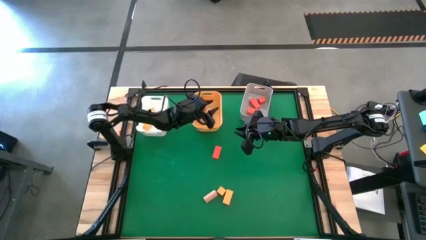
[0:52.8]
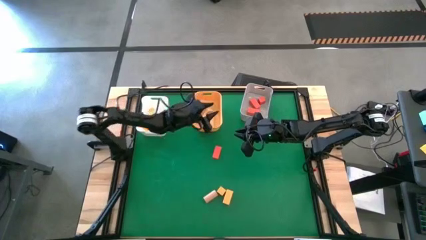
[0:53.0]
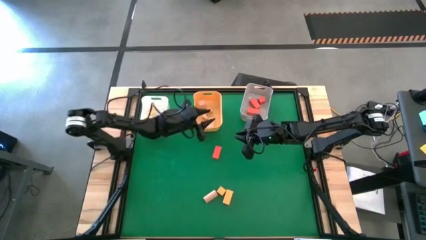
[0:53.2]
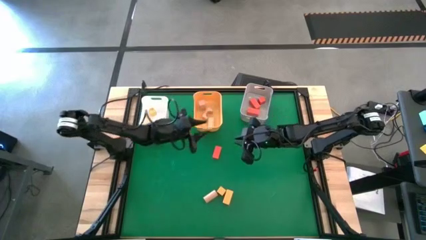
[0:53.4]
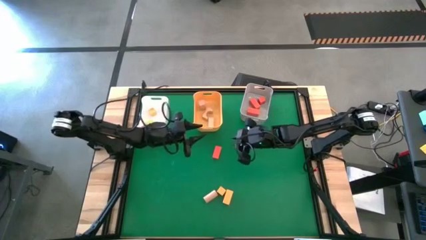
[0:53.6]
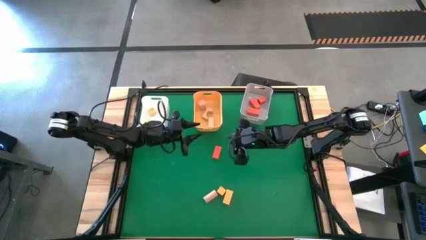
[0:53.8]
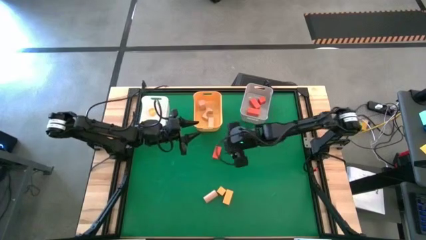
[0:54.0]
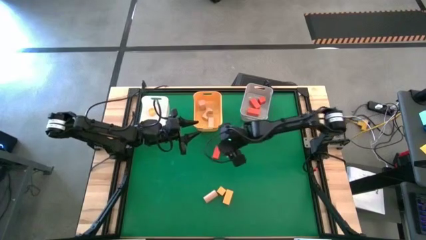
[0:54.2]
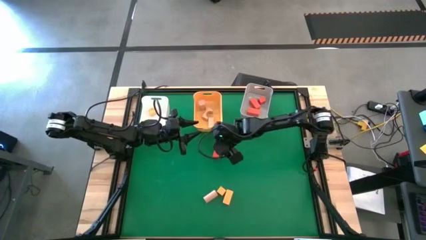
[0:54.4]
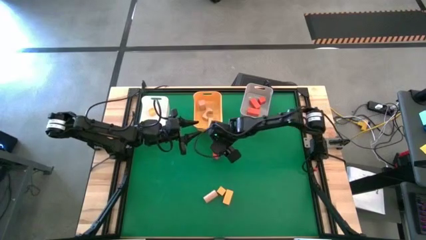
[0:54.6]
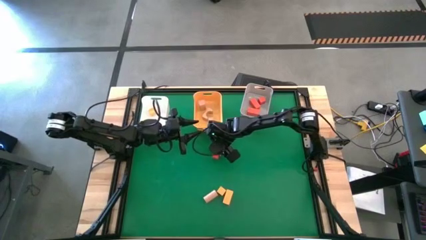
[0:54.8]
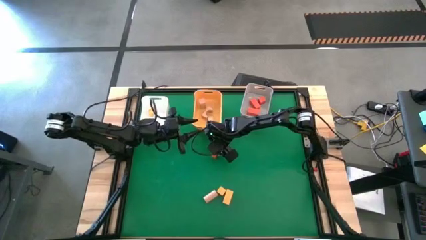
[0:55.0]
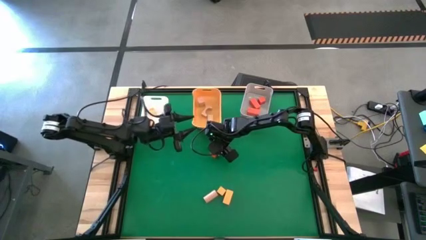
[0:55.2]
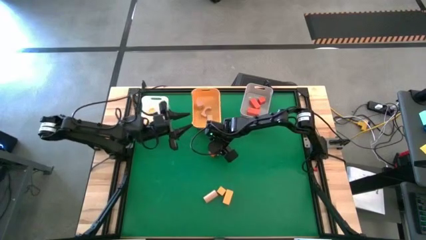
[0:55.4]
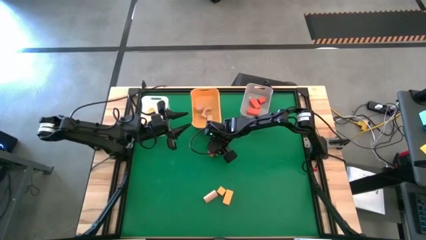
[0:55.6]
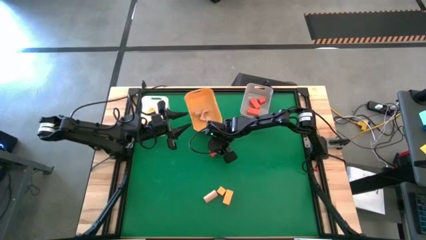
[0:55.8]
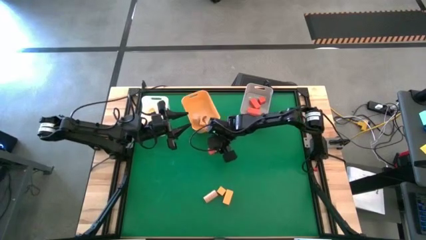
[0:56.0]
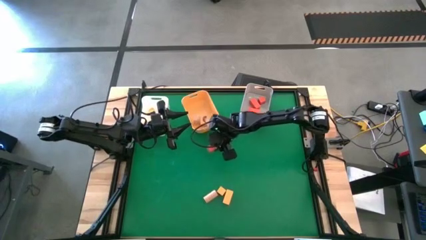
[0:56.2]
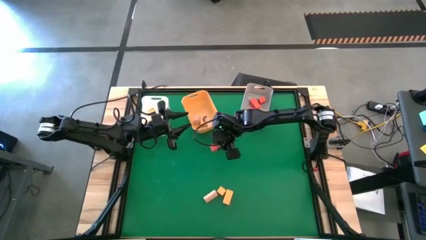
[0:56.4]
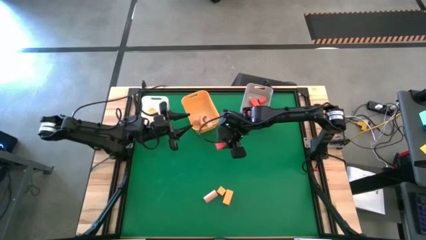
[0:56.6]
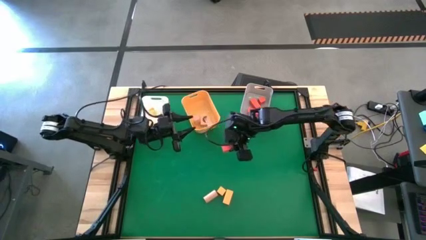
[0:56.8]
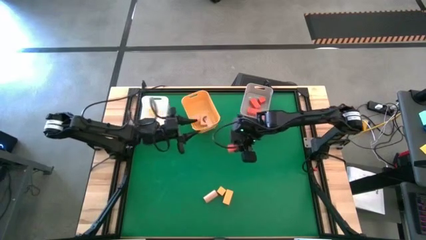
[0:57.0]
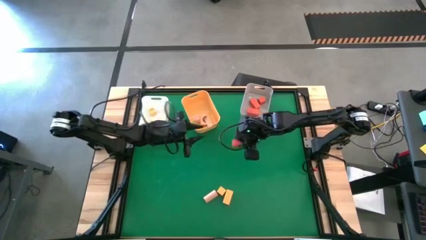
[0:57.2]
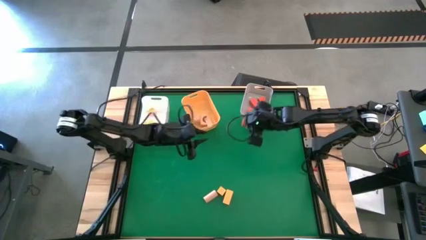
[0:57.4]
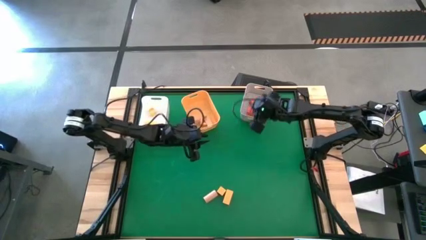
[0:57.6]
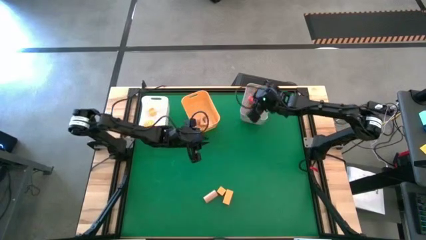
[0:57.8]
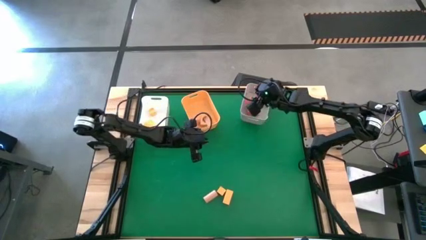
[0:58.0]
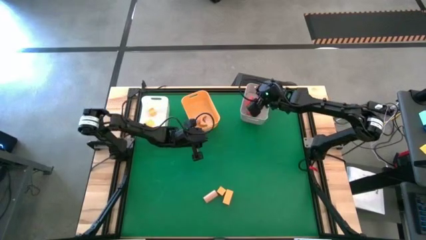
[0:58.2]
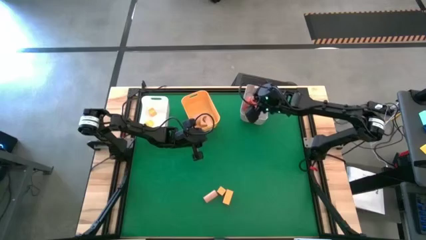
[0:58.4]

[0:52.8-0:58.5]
Task: Sort & place blocks by color
Put the orange block into the light gray bin

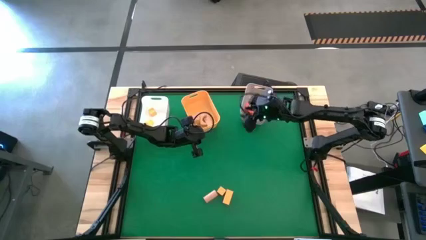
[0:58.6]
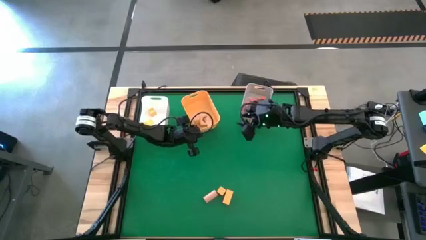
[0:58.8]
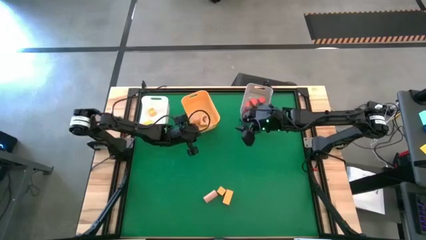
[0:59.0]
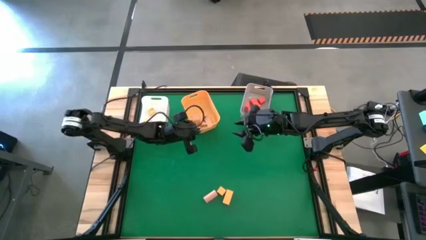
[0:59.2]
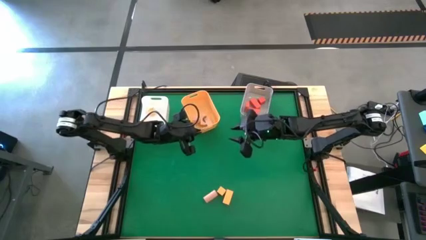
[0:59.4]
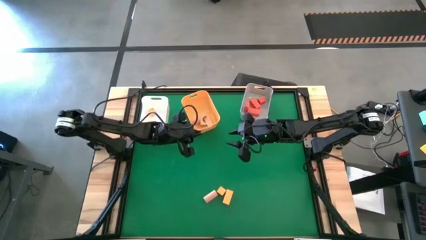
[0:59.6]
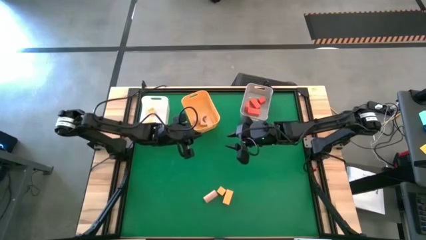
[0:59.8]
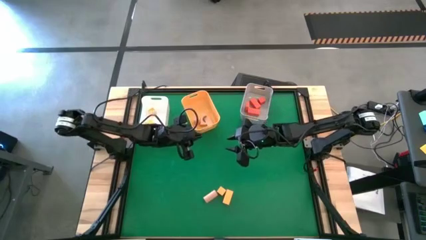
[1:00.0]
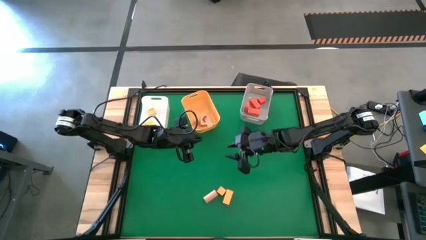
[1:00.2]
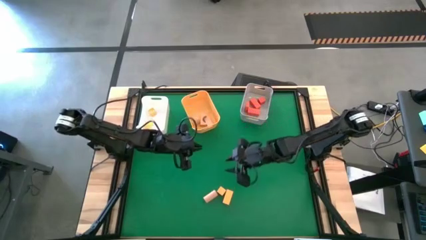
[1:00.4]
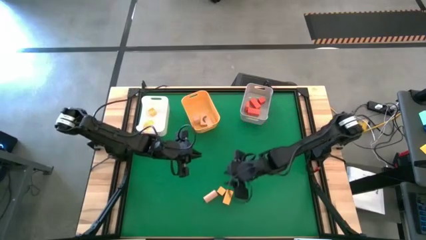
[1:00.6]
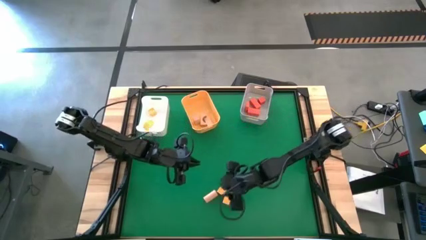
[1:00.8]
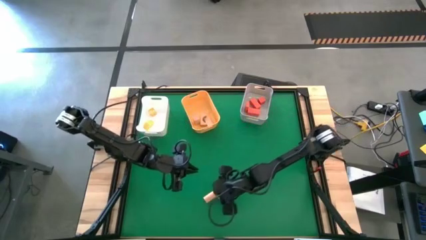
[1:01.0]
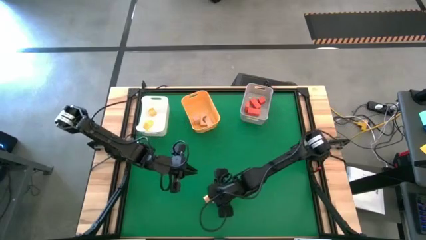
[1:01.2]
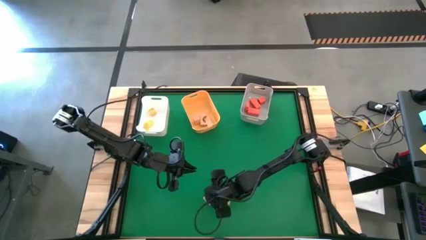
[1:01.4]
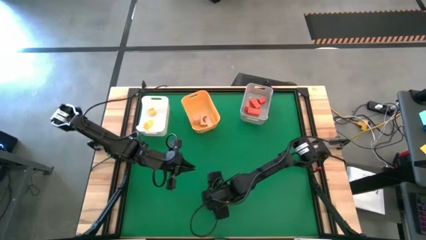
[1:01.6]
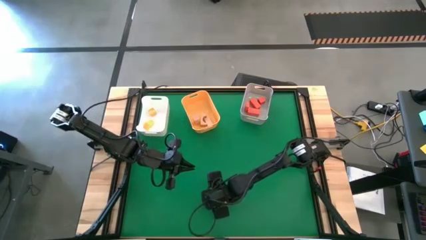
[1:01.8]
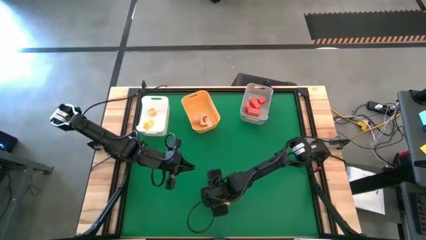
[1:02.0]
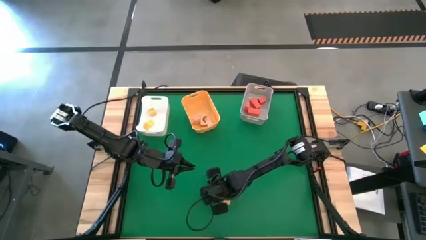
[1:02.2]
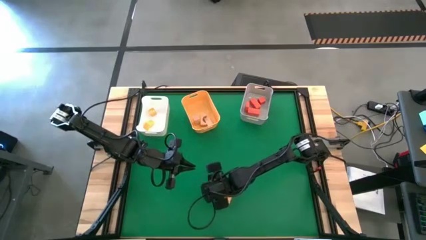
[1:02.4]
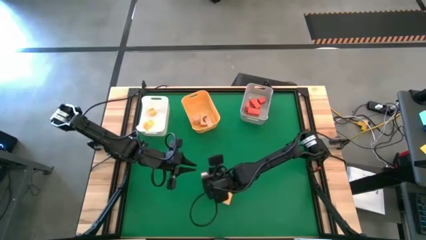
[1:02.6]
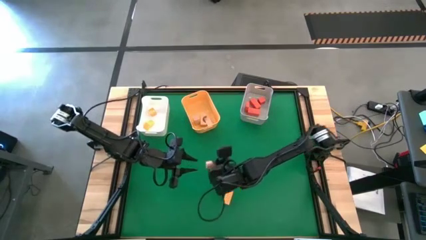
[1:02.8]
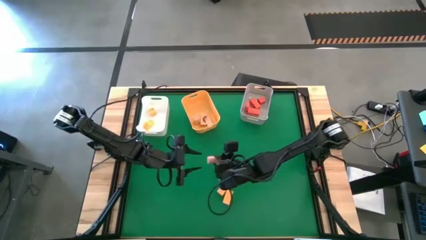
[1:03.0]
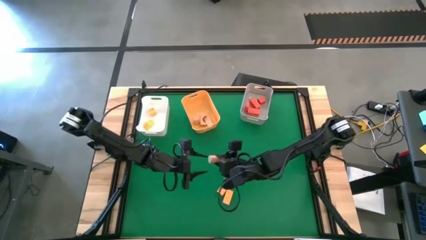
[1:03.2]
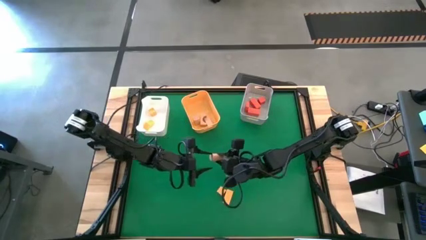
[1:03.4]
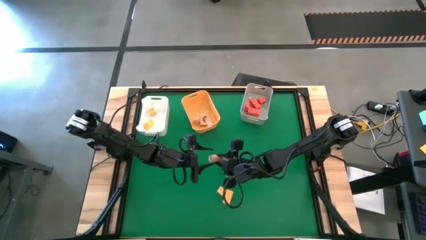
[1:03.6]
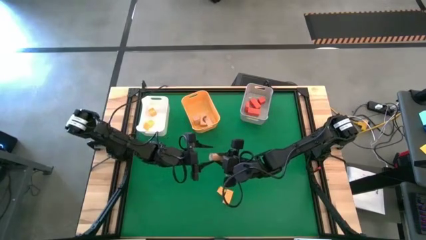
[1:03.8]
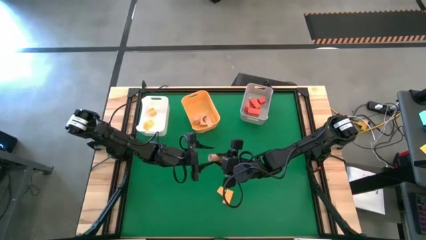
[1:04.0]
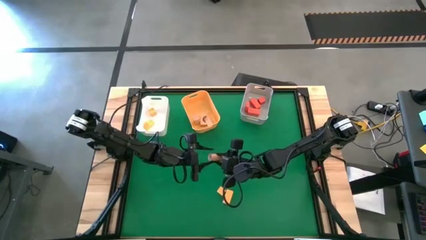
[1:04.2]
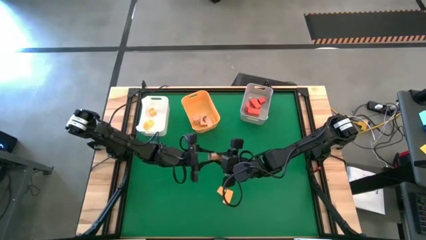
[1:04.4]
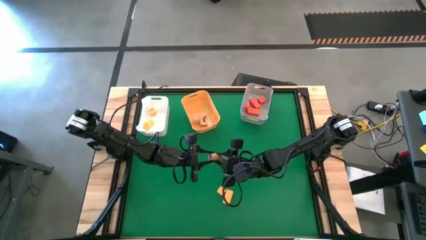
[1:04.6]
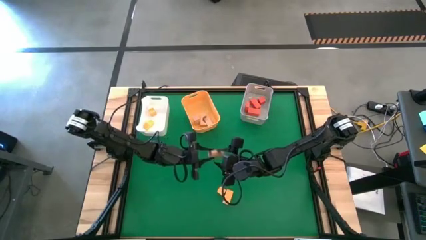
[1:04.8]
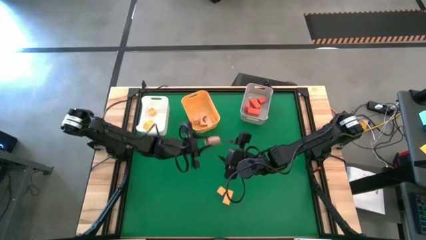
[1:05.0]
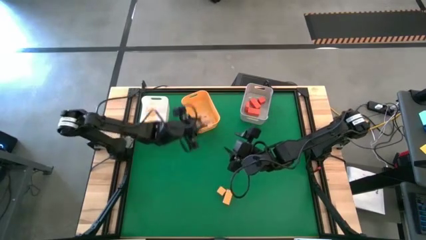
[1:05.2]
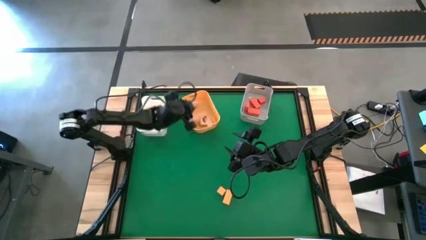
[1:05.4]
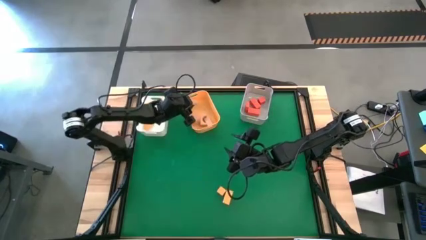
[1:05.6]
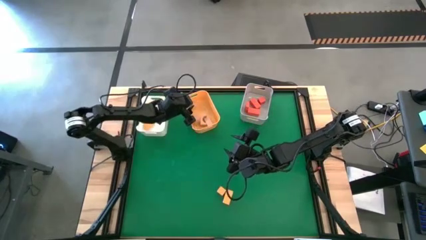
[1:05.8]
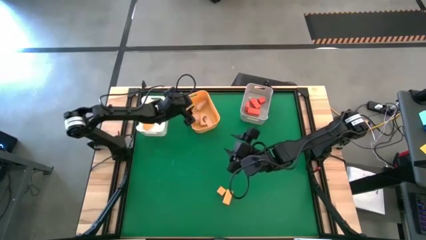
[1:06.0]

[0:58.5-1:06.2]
Put the brown block into the yellow bin

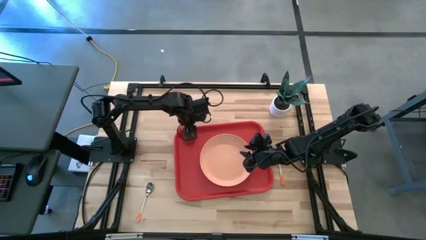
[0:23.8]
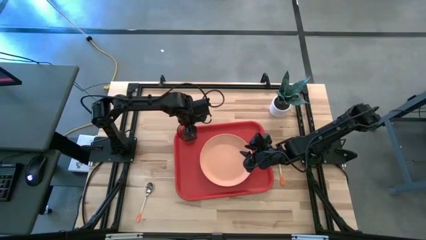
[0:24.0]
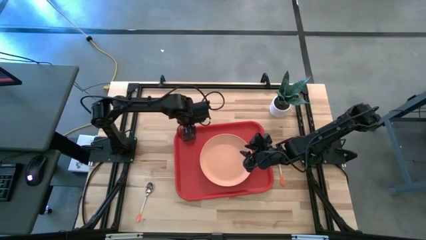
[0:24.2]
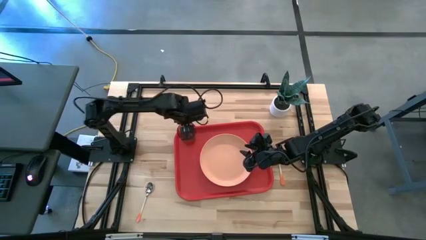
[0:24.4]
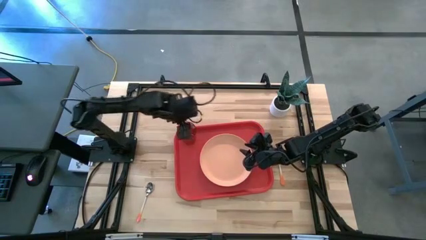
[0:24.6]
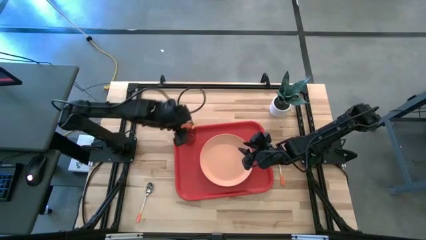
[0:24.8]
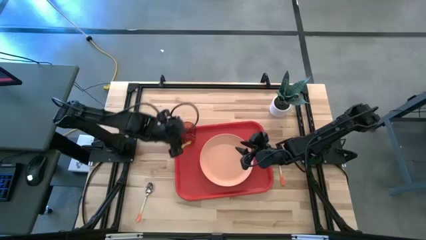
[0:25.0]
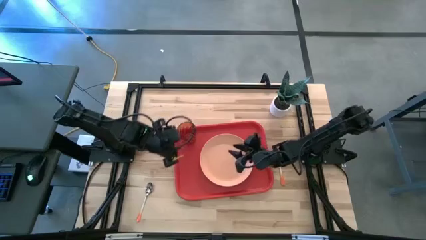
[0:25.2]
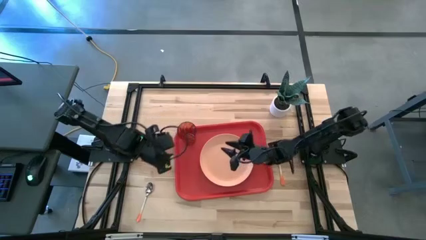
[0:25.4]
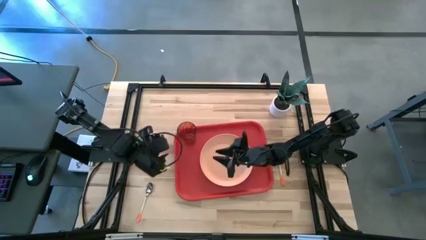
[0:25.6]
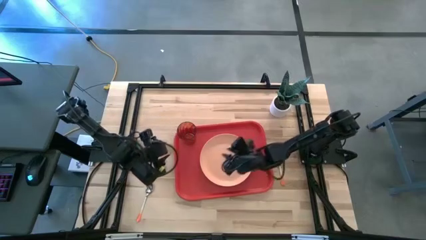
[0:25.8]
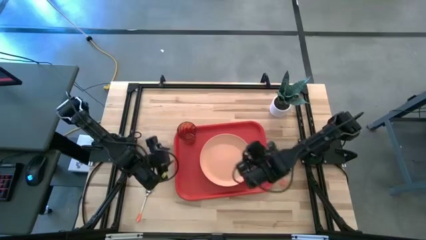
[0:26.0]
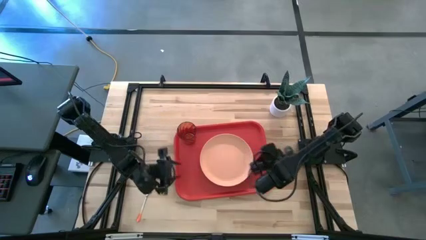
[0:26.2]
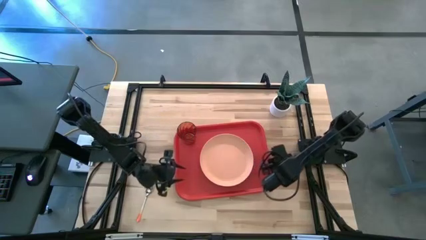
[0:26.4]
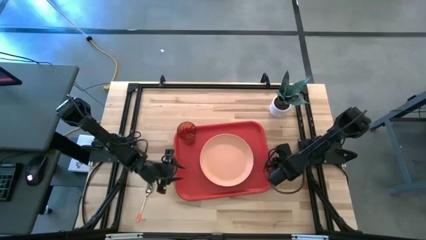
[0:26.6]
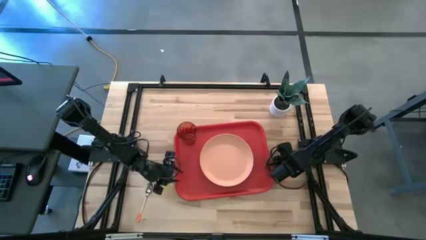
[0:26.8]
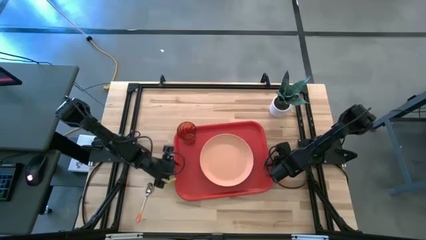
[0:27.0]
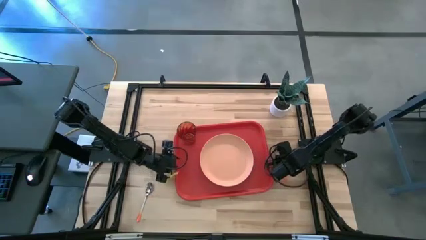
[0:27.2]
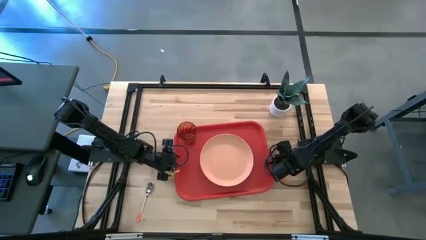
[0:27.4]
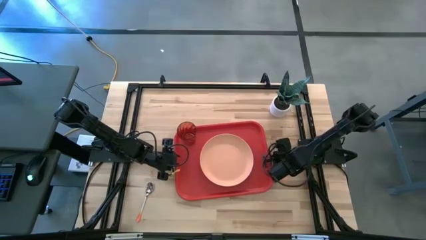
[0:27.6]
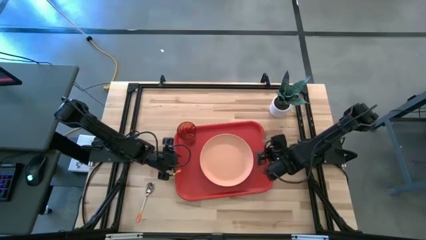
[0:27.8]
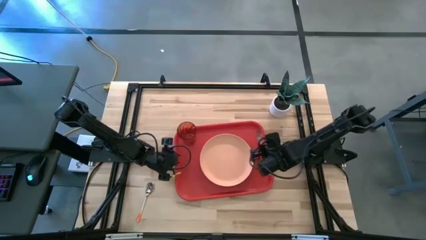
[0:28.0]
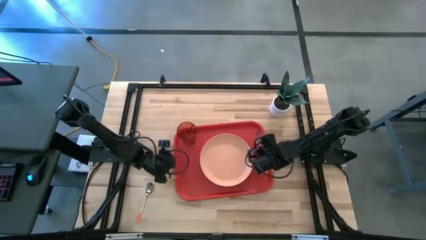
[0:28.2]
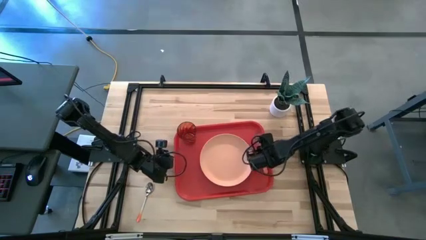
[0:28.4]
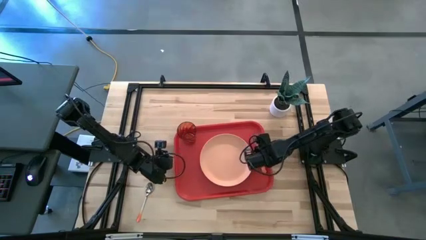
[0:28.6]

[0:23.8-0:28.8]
Task: Pick and place plate/cup/fork/spoon on tray
Put the orange fork on the red serving tray to the right of the orange plate
